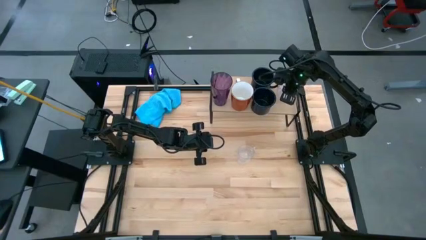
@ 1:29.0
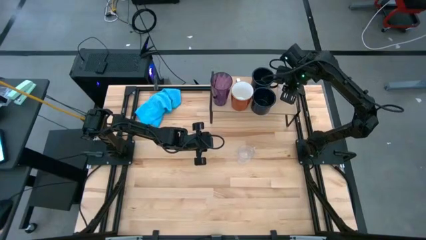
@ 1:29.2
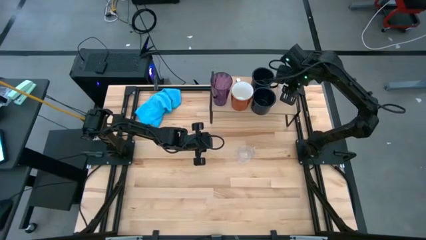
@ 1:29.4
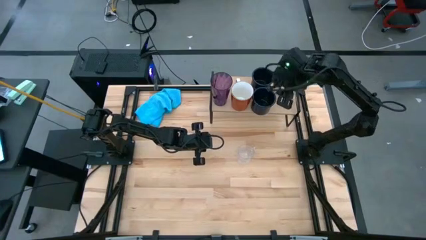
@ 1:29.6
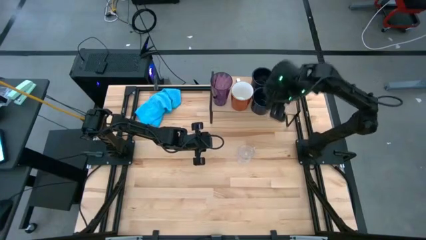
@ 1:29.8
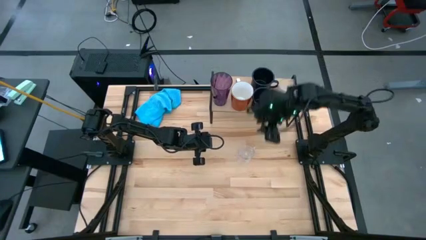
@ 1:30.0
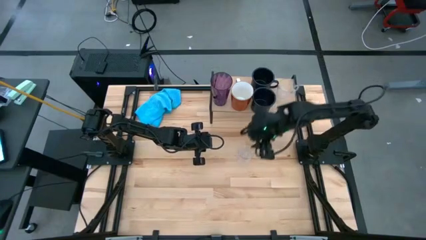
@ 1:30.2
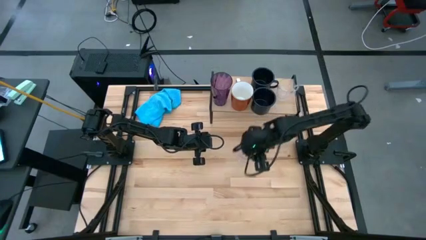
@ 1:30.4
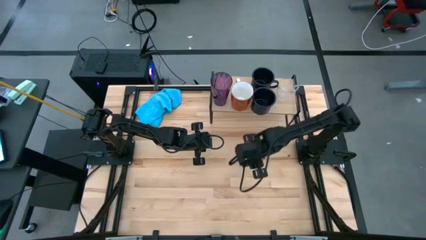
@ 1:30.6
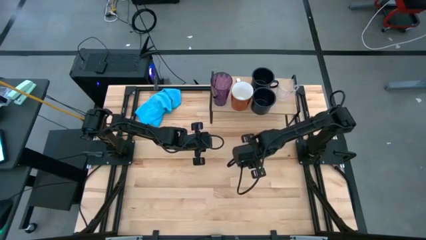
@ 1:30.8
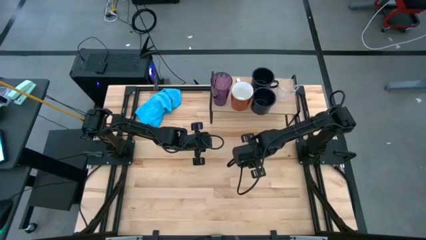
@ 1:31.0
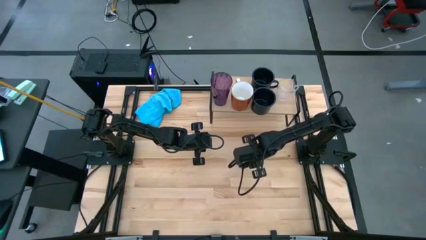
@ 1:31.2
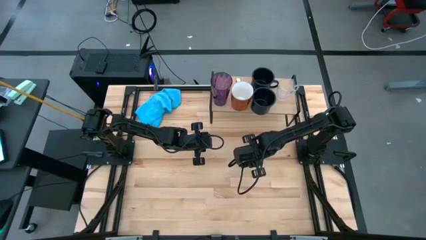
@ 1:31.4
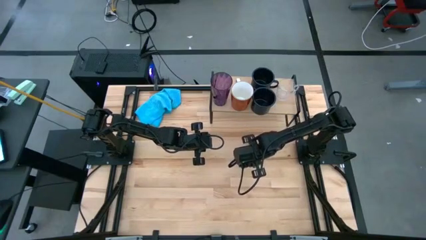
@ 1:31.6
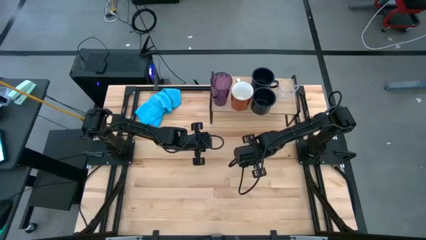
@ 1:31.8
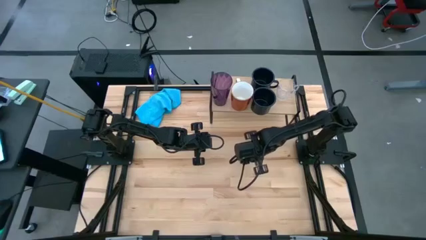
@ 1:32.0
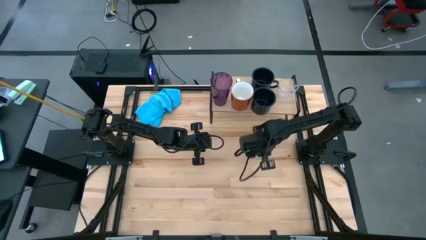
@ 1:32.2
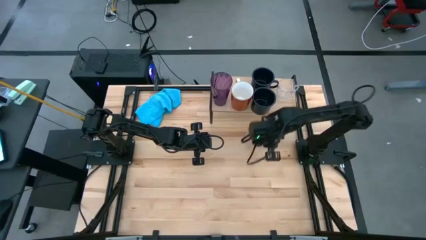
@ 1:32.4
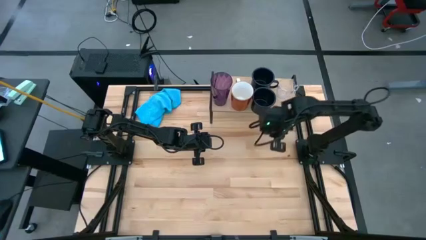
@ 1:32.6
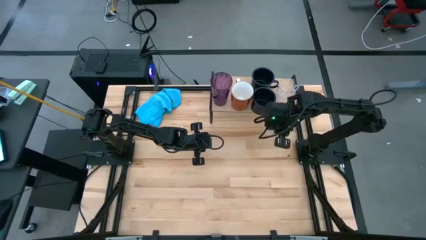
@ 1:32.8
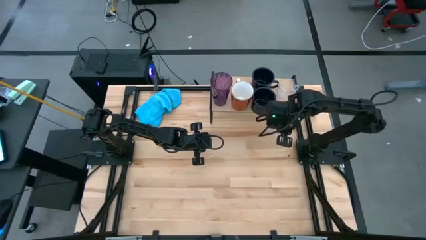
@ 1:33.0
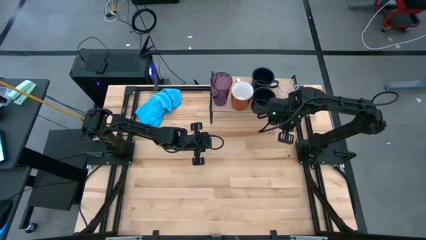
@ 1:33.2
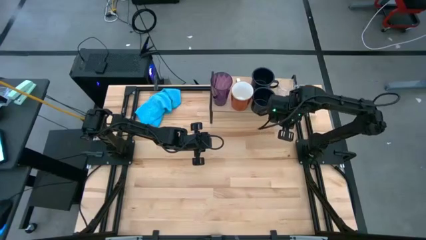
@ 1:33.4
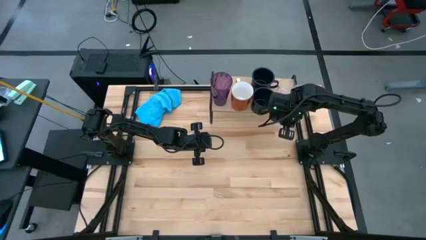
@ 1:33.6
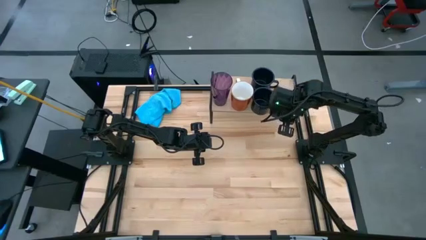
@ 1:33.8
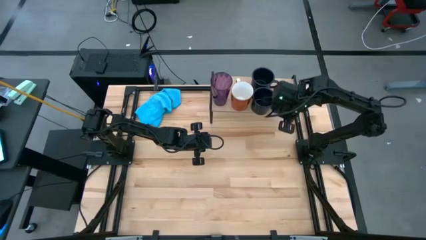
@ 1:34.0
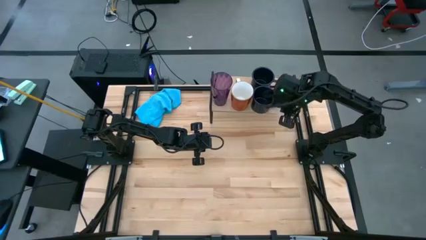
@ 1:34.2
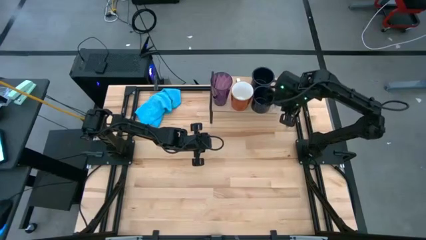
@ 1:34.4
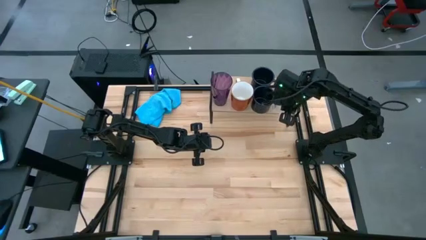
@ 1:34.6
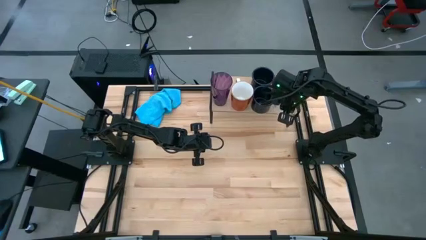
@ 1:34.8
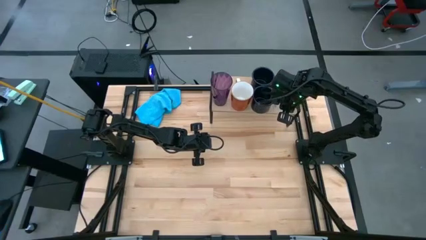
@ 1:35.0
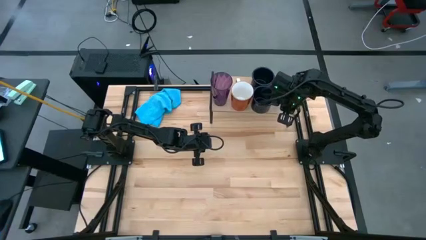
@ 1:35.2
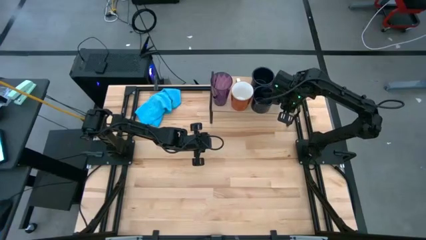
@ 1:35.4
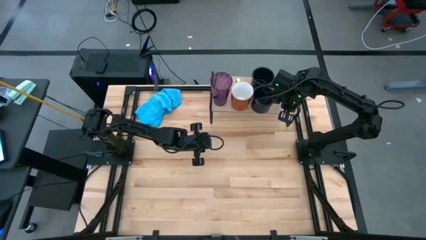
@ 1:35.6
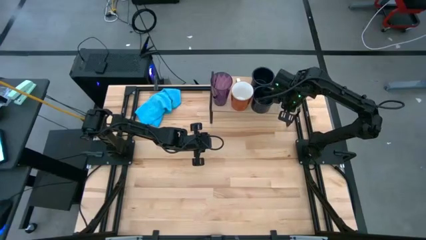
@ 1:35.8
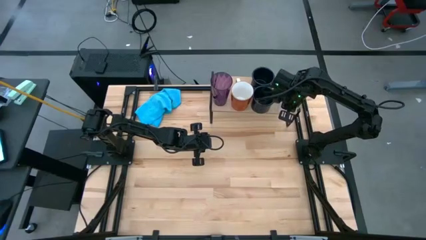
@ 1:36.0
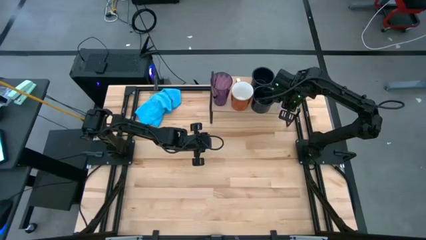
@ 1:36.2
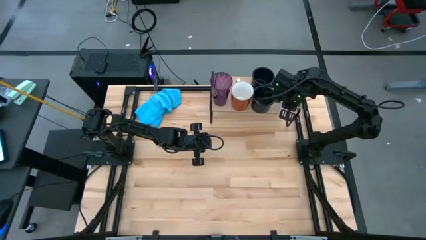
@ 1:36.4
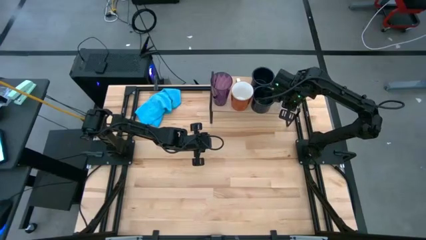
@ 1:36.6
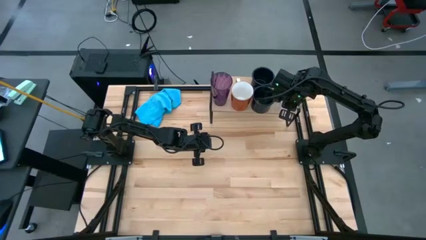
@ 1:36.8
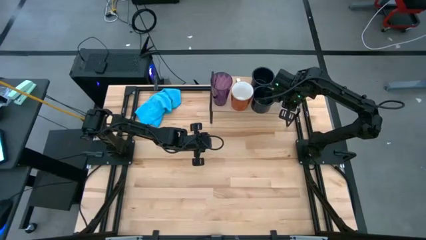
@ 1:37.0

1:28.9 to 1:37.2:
Task: Stack small to large cups/mugs on shelf
Put the transparent mug on the shelf

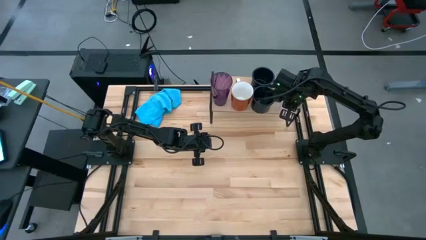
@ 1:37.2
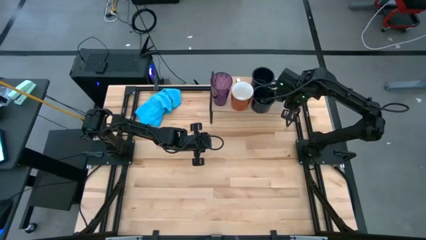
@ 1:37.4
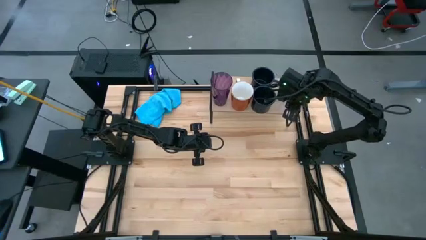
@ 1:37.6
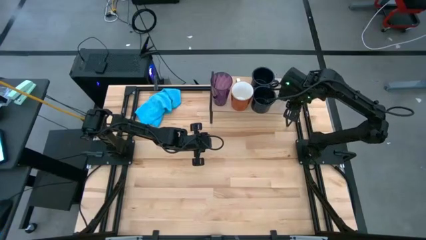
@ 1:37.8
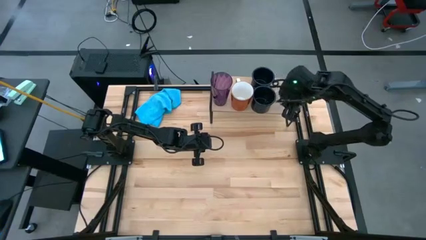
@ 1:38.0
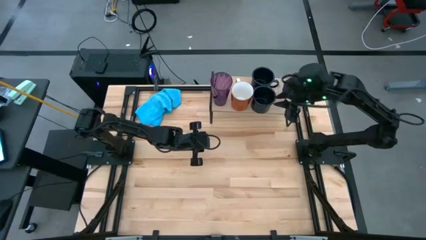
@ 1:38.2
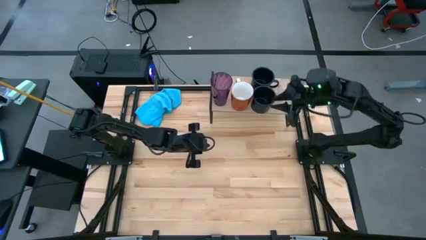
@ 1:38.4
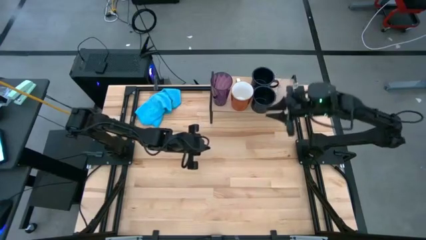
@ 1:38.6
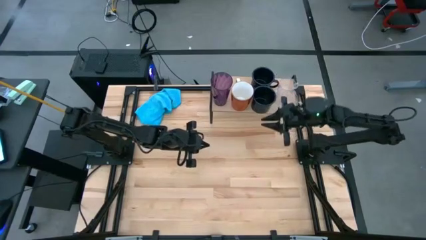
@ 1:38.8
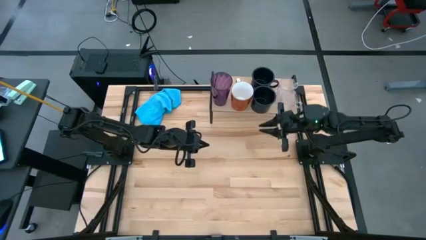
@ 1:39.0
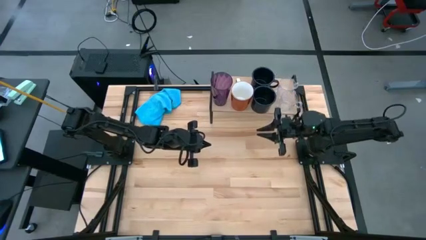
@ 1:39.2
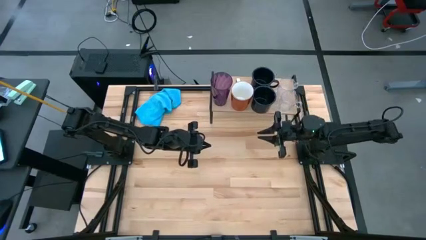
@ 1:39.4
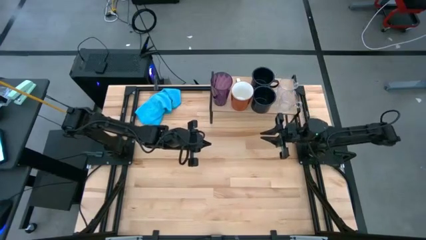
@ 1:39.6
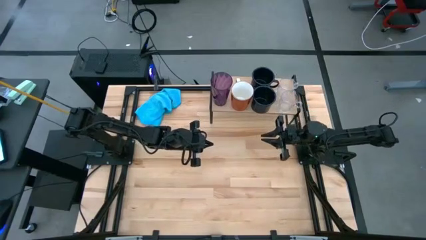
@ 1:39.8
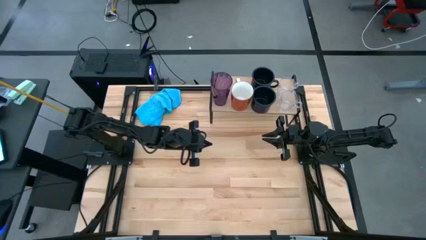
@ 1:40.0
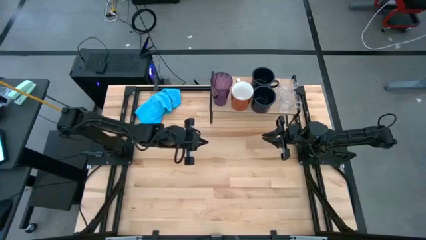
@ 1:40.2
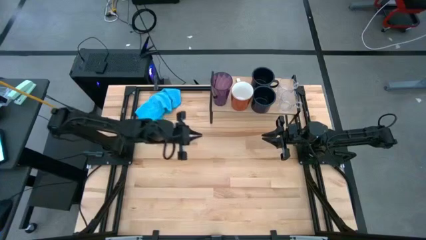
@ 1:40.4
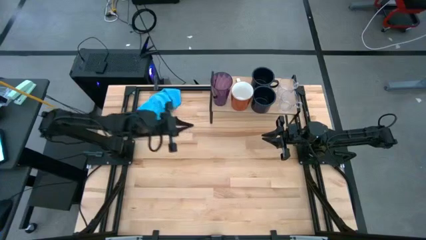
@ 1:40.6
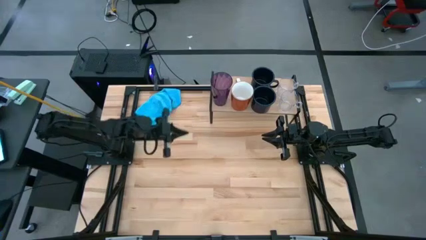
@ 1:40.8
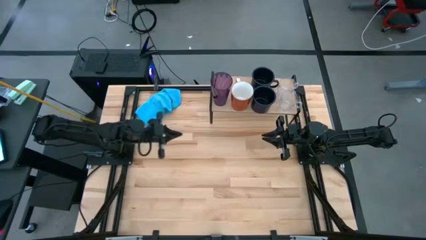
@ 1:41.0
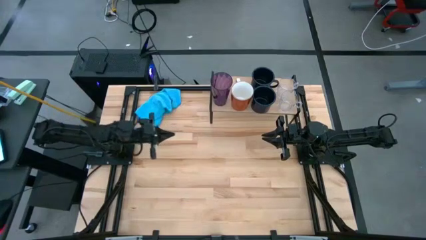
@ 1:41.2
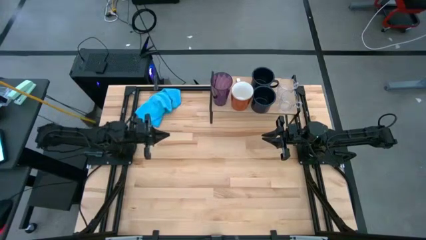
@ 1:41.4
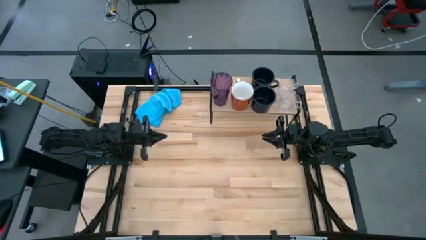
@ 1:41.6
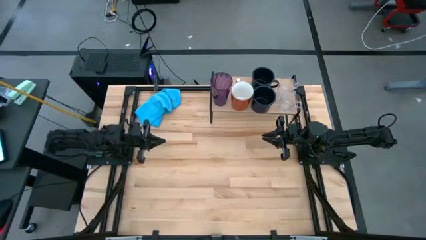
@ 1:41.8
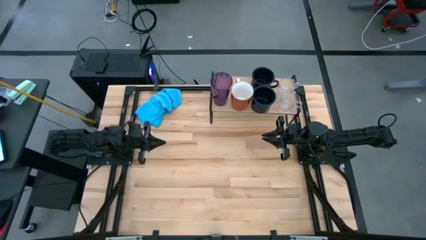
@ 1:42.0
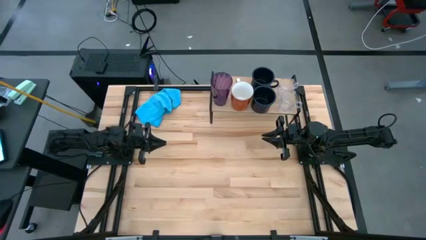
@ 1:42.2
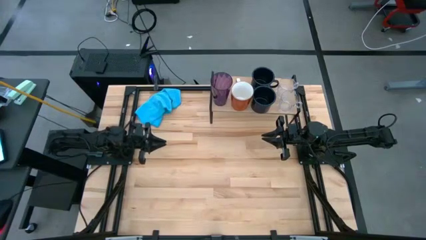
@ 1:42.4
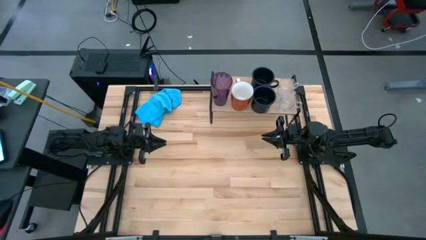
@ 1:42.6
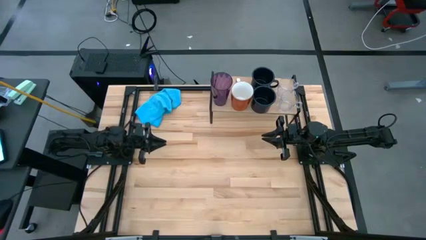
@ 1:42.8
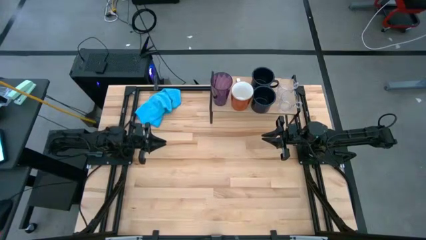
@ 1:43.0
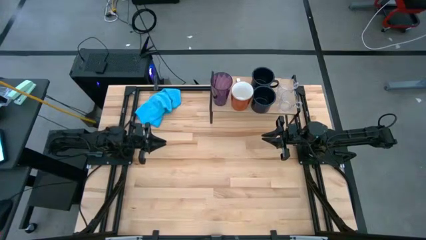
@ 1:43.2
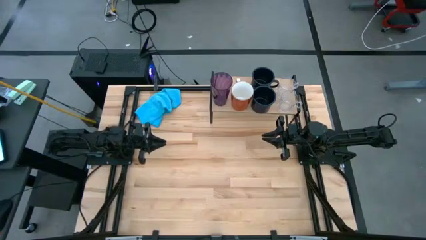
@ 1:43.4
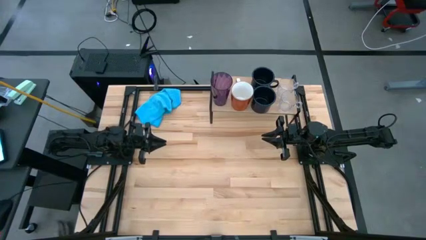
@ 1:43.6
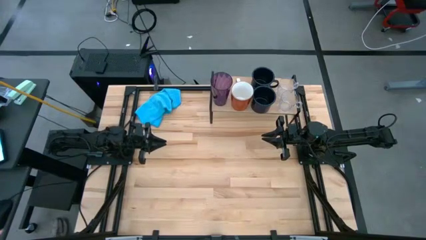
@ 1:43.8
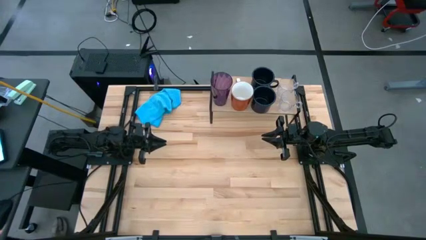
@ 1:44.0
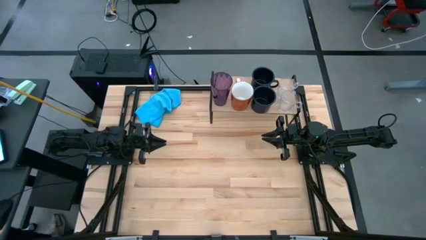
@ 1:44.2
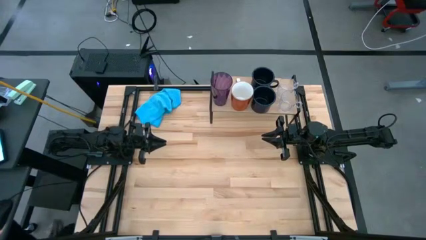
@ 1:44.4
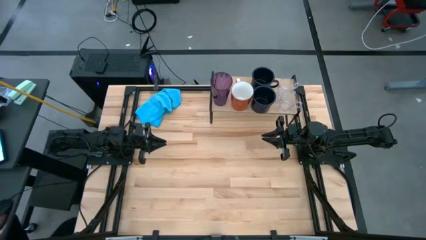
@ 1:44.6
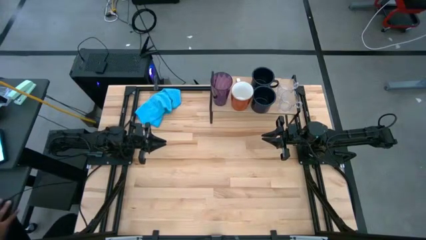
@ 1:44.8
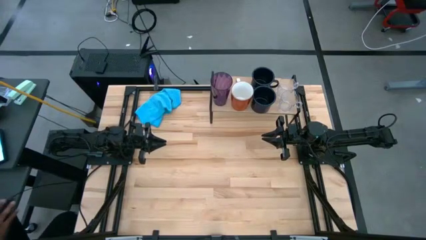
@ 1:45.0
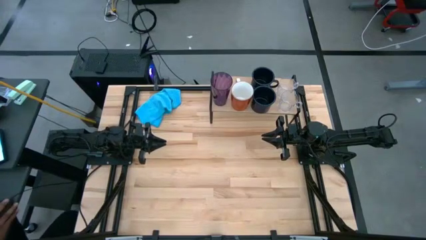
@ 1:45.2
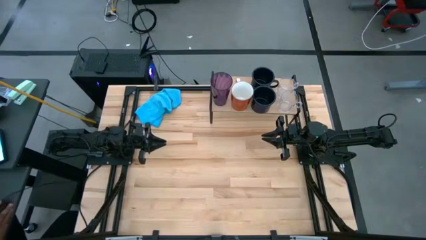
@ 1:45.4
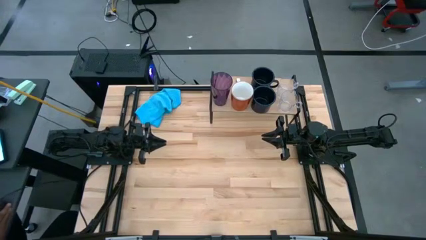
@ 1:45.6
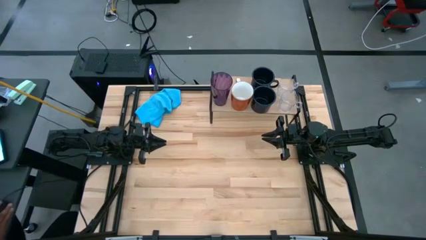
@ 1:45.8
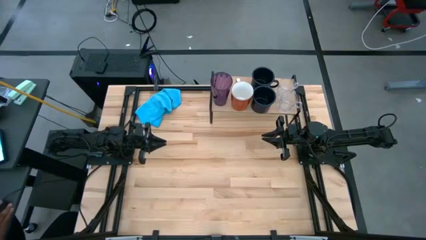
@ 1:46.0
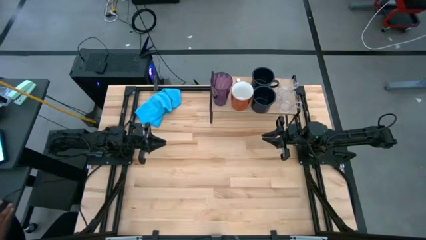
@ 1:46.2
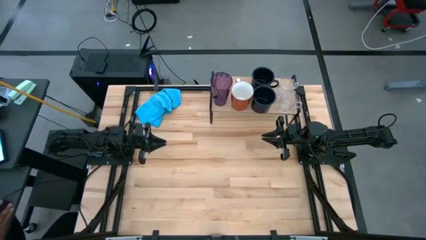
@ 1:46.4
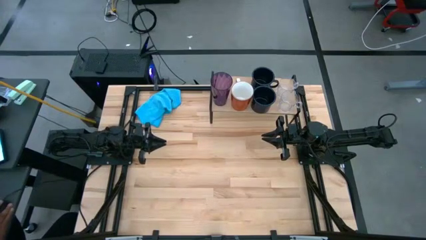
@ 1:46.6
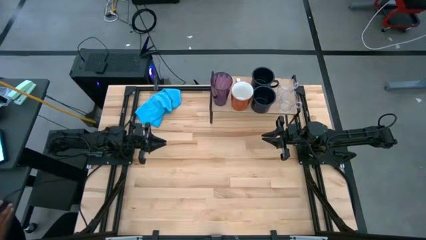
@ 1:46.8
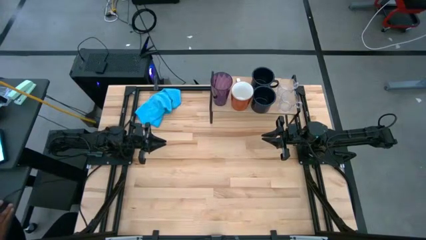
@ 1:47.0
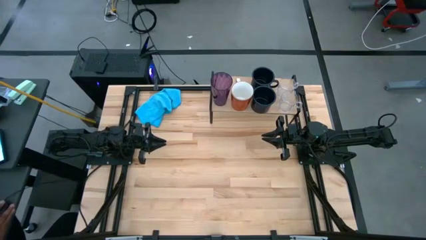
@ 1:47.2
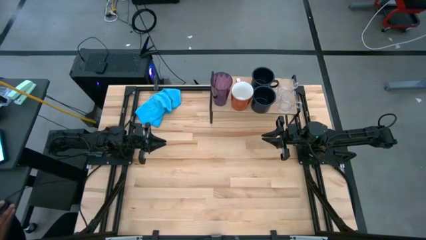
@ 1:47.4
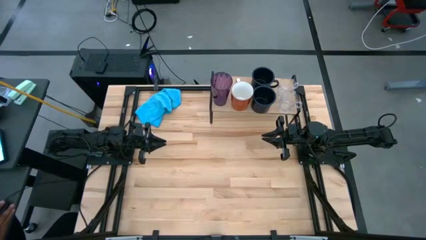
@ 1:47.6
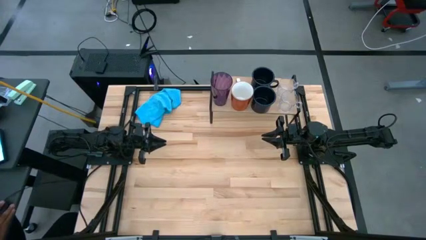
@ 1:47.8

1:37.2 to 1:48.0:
Return to Home Position
